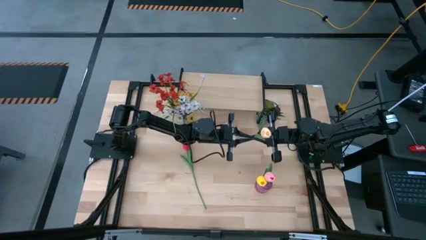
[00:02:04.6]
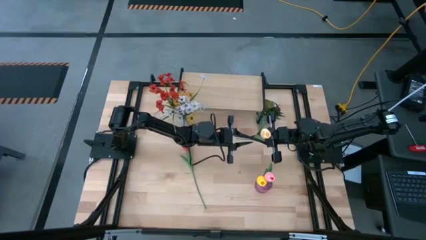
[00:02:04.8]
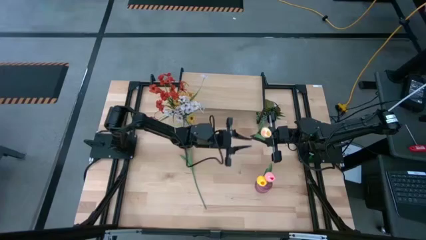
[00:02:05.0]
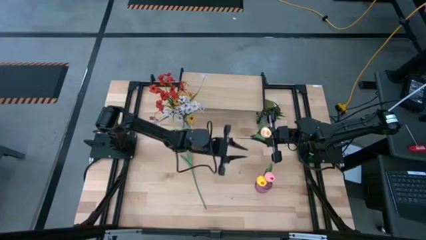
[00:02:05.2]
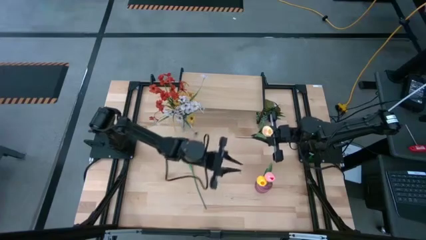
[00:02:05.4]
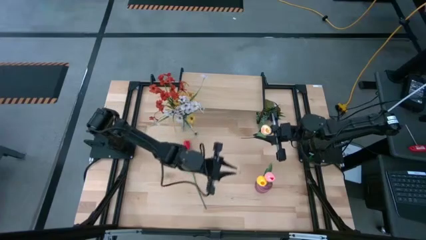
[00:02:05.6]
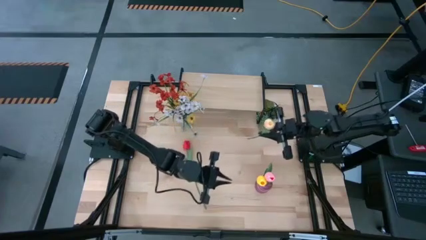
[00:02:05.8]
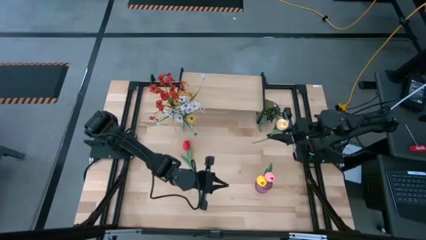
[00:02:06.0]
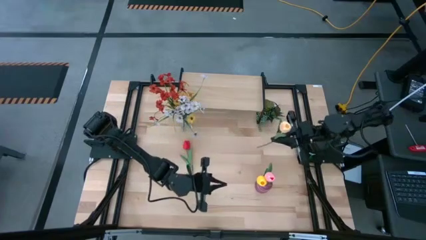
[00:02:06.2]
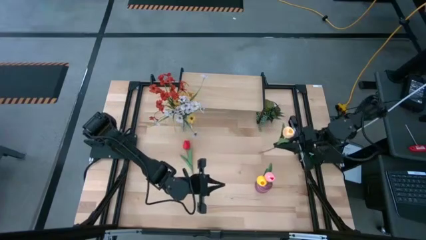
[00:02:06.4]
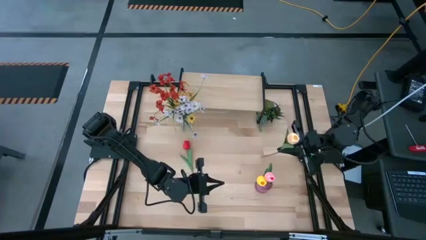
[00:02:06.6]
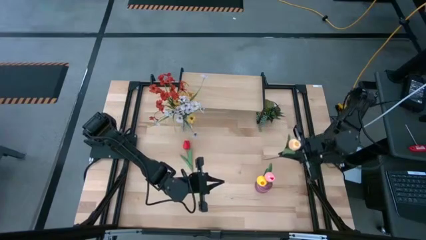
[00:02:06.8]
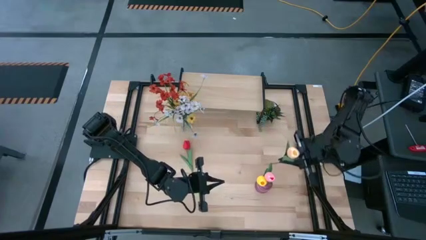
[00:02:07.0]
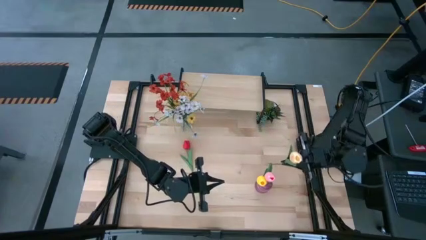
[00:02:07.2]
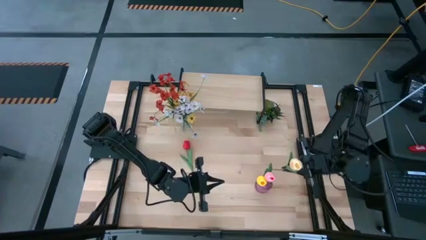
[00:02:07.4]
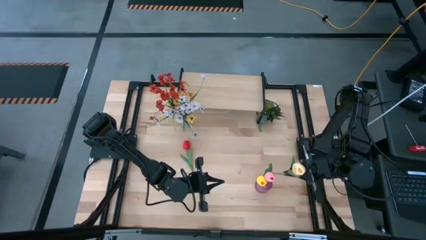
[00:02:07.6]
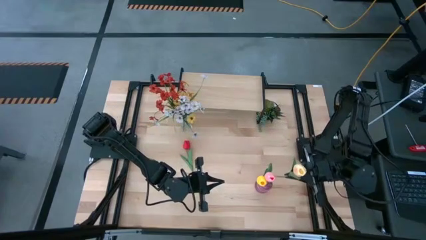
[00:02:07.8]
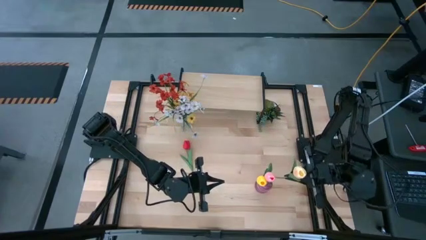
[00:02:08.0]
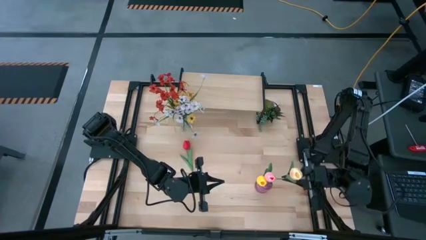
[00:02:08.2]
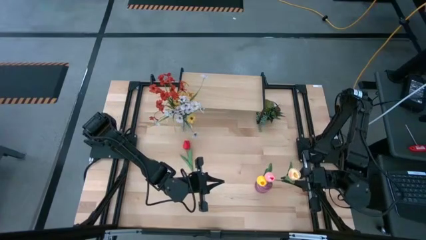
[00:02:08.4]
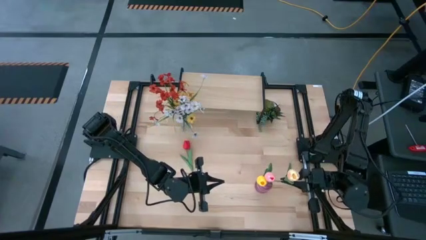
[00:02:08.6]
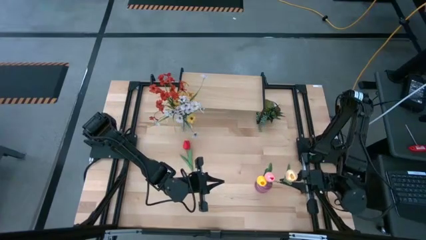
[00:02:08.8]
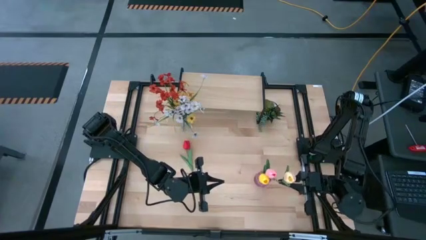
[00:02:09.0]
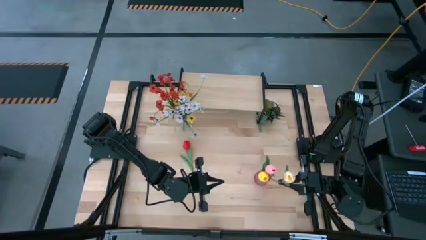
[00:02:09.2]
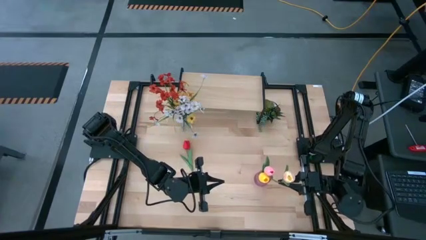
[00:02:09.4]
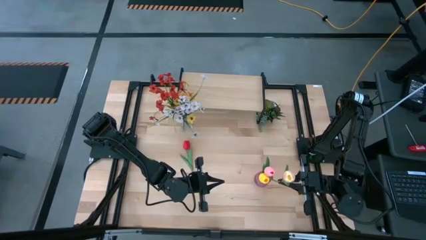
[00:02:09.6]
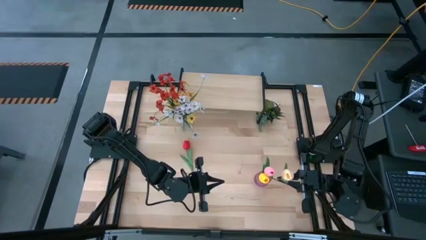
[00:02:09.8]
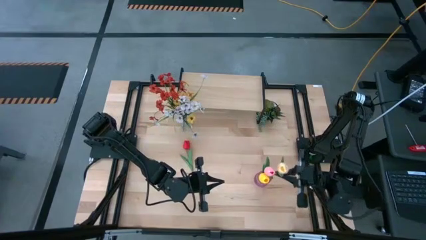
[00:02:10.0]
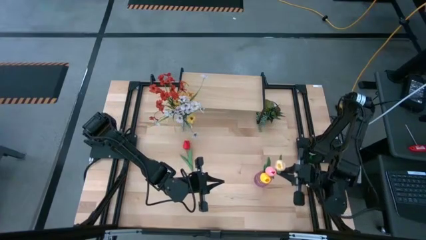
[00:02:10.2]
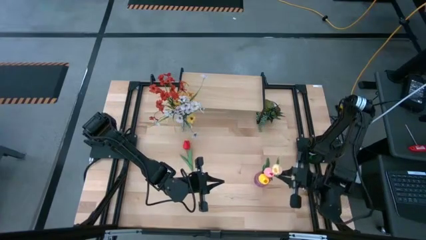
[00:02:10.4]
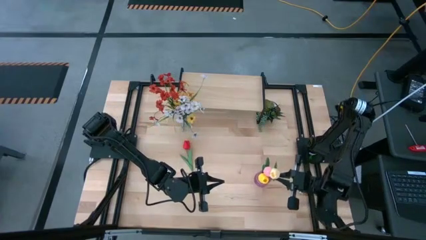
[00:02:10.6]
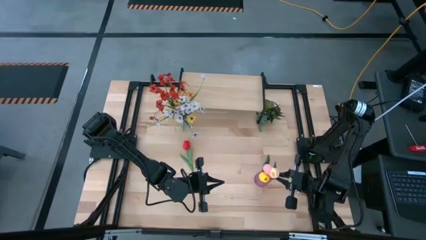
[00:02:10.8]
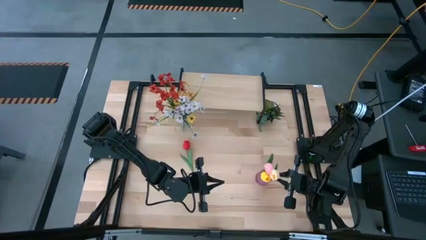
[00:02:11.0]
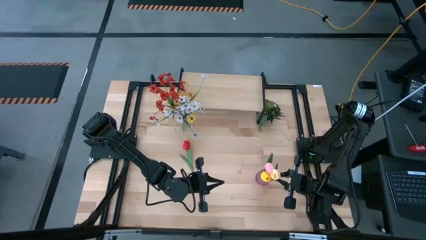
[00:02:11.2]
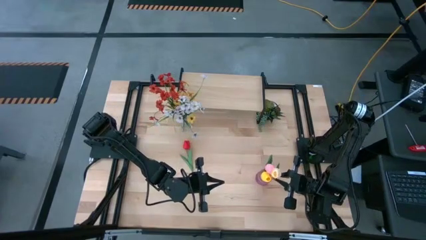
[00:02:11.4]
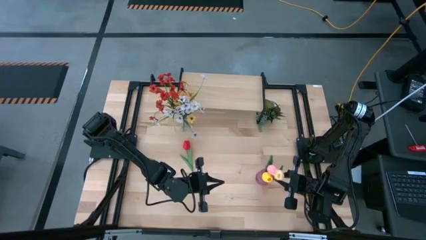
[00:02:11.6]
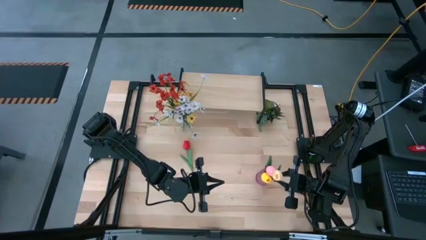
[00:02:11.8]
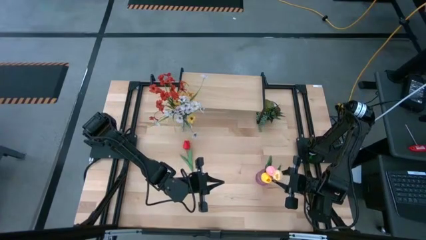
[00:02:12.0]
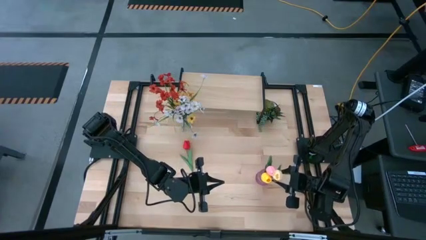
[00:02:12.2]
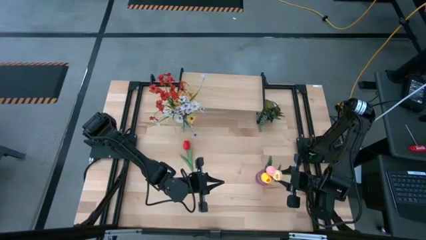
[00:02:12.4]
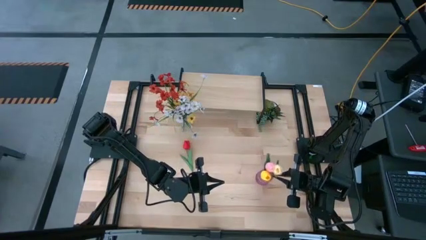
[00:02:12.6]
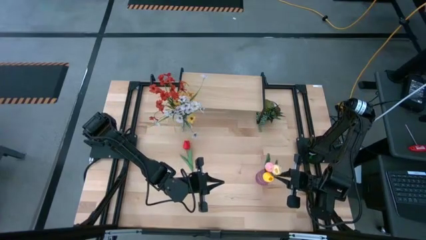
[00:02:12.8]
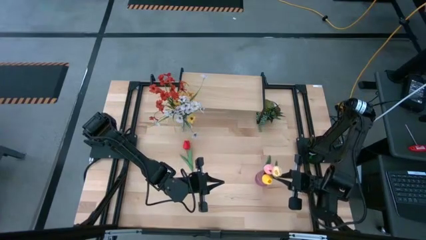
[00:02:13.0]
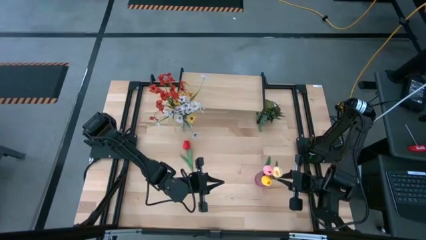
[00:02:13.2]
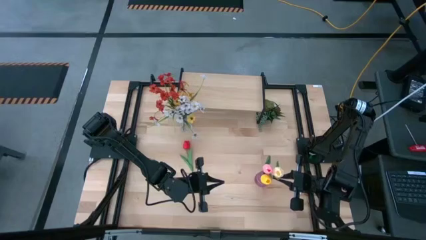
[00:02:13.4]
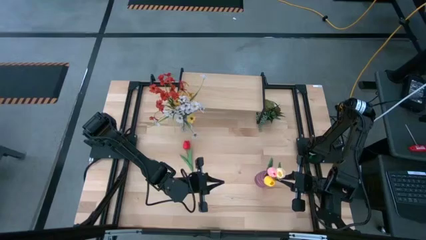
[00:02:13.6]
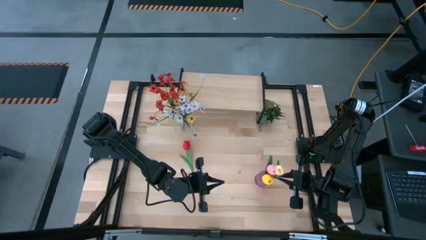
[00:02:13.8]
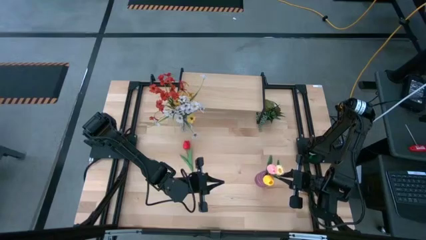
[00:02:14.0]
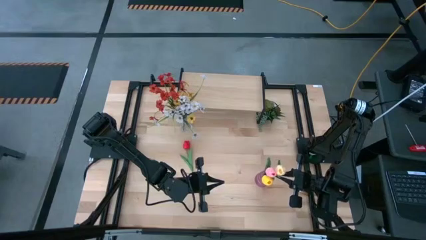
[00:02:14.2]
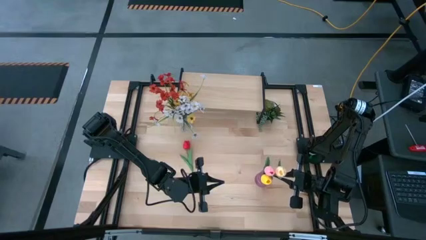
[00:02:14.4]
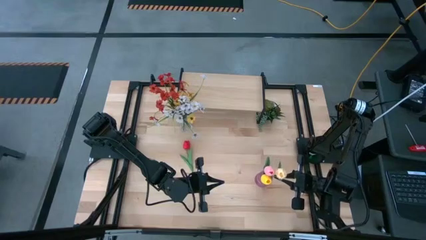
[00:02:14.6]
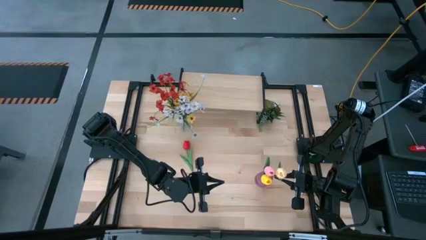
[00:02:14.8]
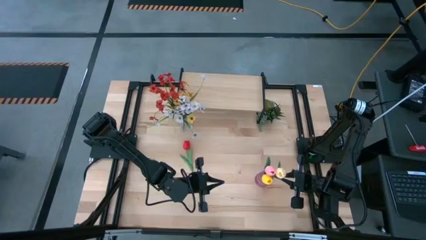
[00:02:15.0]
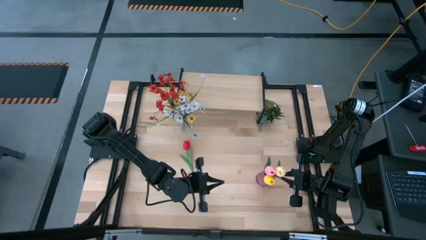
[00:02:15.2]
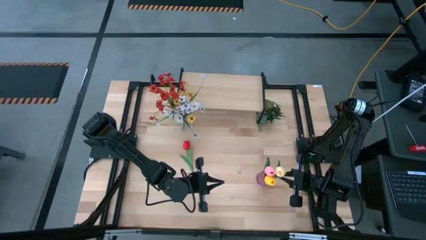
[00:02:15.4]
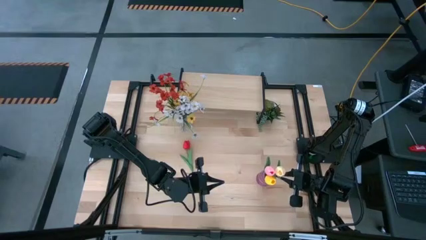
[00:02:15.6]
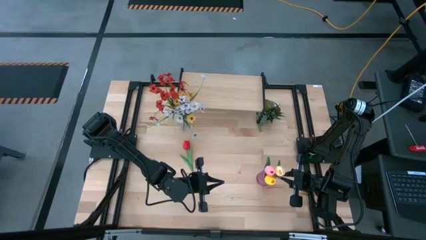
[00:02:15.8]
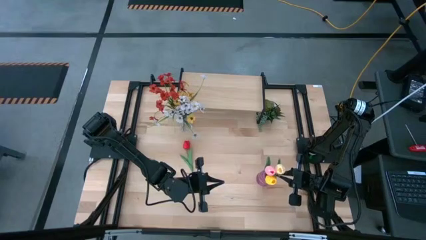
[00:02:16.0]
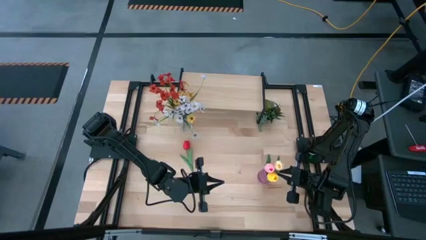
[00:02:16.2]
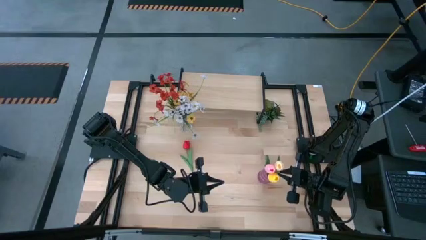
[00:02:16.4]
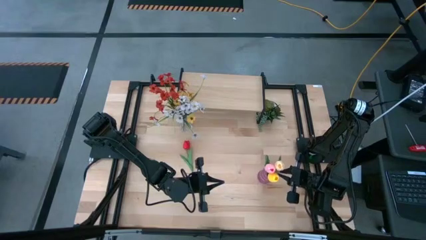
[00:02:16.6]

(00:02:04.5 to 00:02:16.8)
Task: Pick and place flowers into a vace then onto a shelf
Put the white flower into the purple vase
